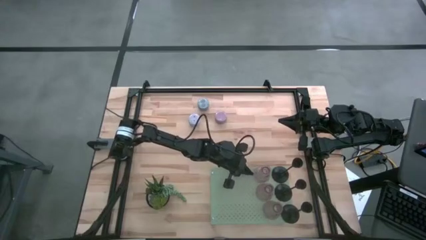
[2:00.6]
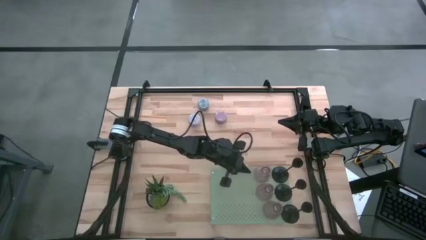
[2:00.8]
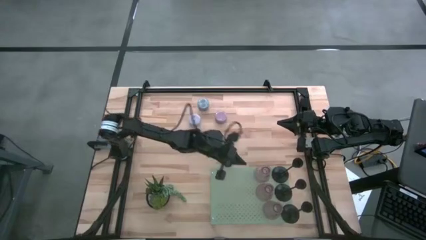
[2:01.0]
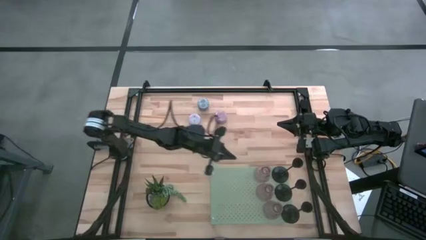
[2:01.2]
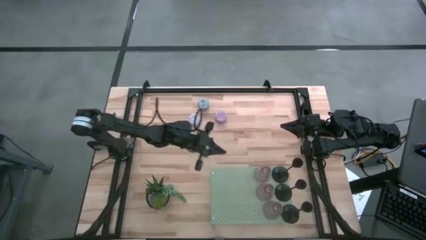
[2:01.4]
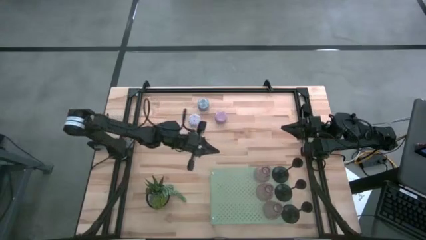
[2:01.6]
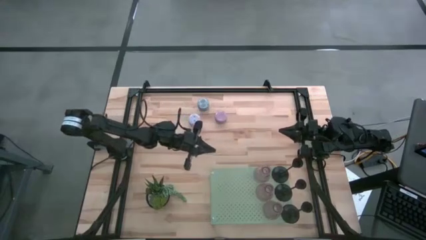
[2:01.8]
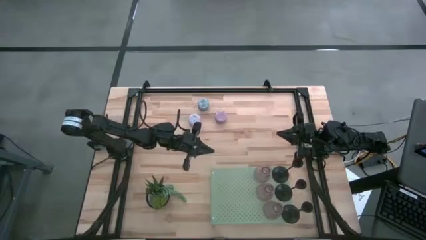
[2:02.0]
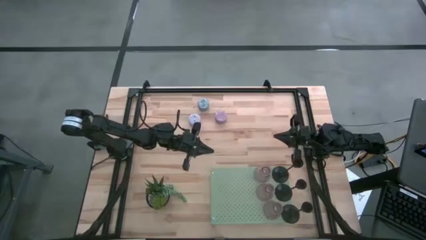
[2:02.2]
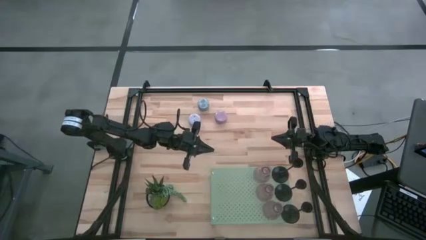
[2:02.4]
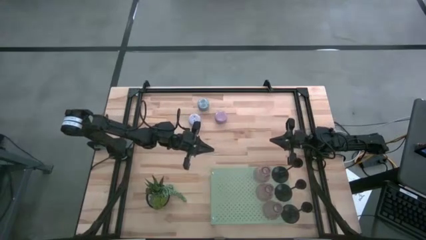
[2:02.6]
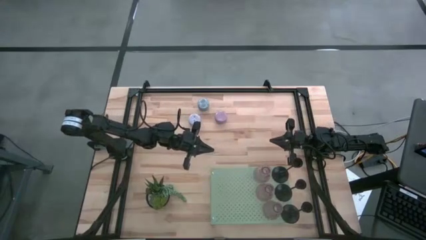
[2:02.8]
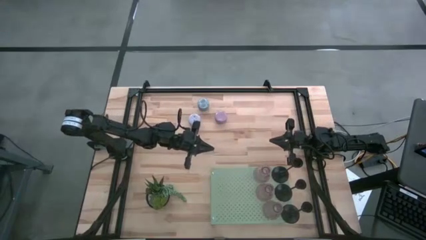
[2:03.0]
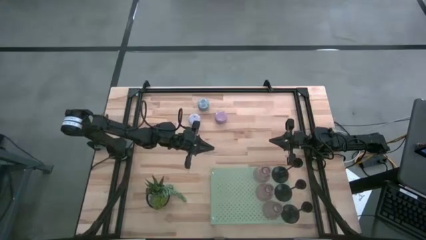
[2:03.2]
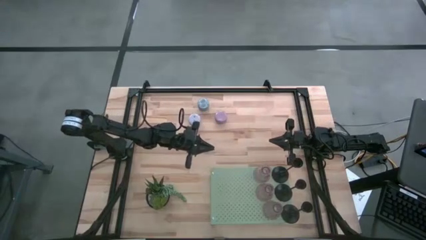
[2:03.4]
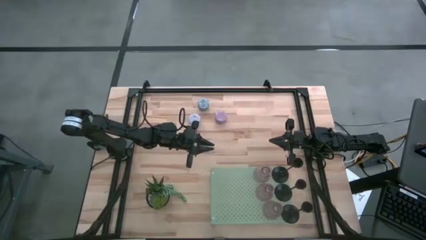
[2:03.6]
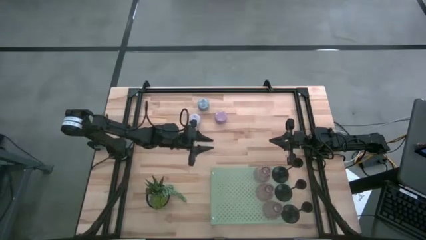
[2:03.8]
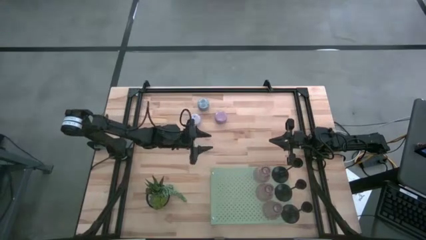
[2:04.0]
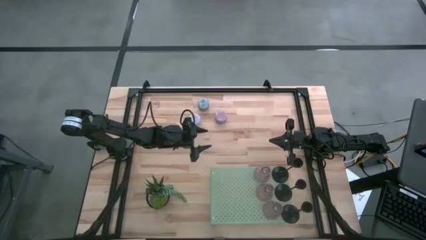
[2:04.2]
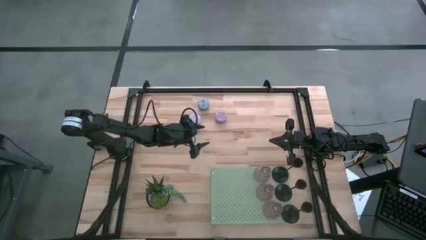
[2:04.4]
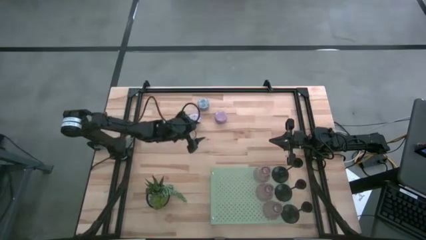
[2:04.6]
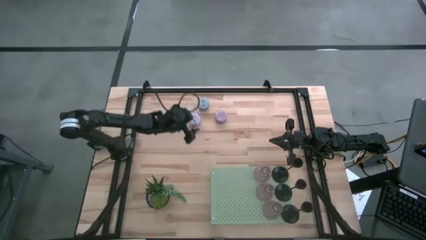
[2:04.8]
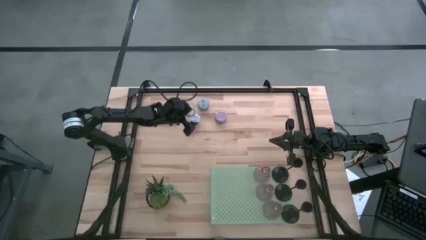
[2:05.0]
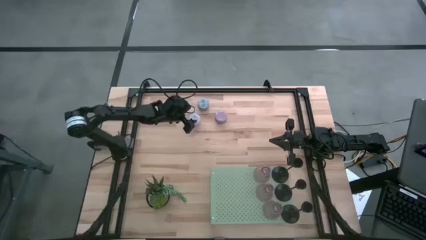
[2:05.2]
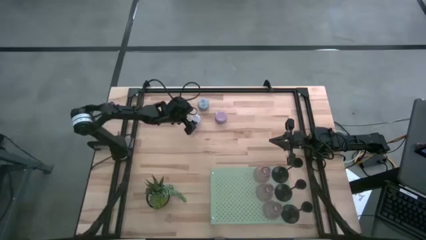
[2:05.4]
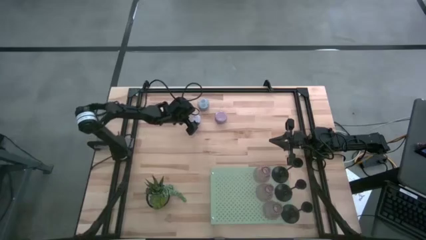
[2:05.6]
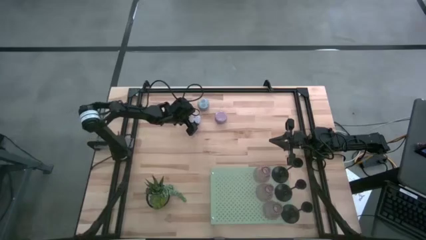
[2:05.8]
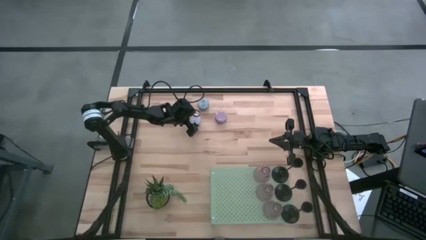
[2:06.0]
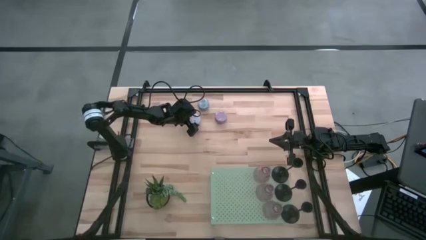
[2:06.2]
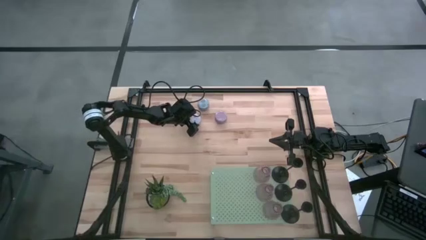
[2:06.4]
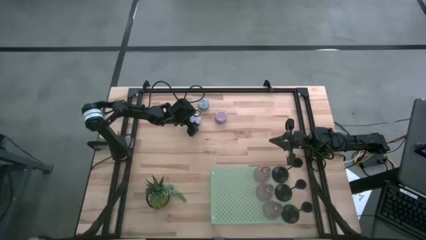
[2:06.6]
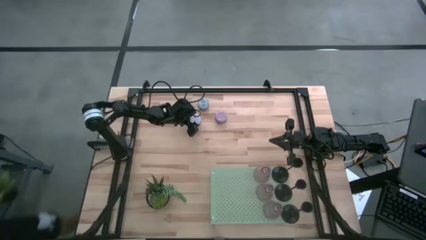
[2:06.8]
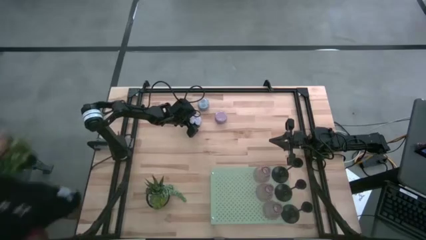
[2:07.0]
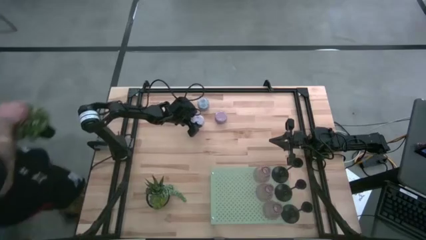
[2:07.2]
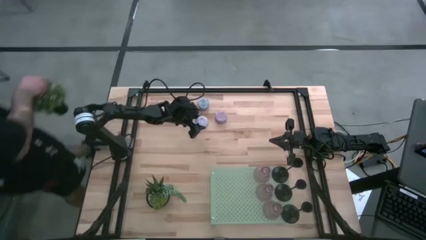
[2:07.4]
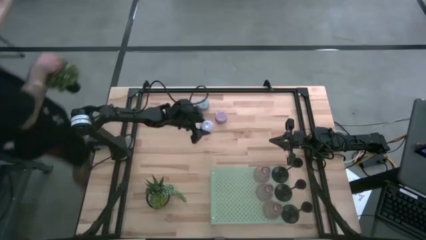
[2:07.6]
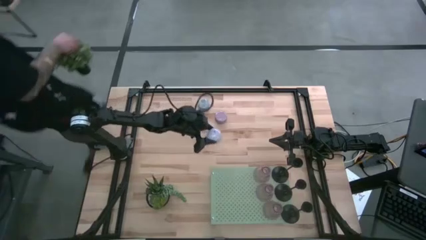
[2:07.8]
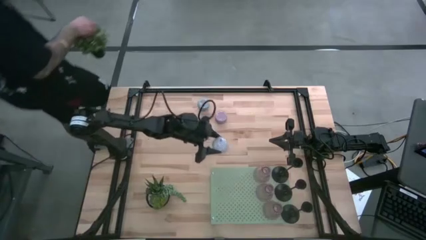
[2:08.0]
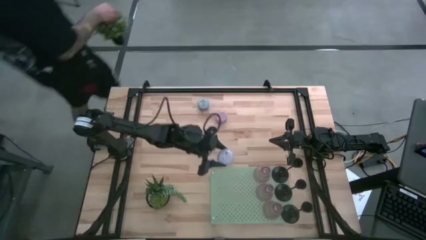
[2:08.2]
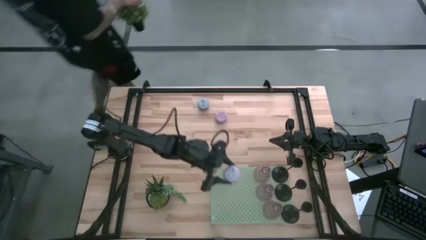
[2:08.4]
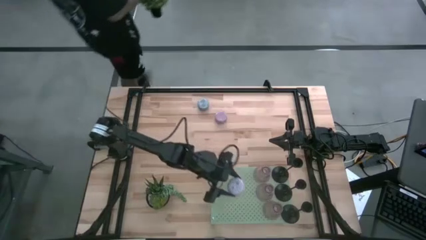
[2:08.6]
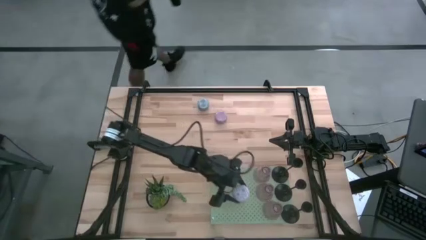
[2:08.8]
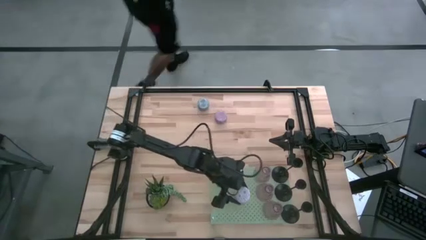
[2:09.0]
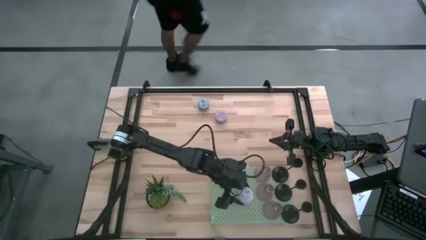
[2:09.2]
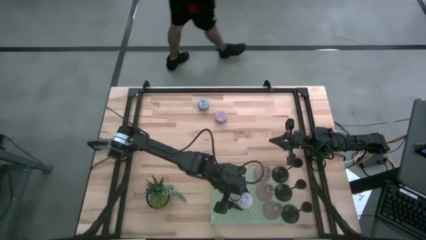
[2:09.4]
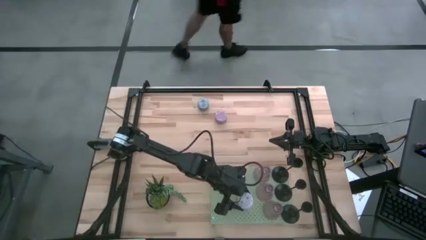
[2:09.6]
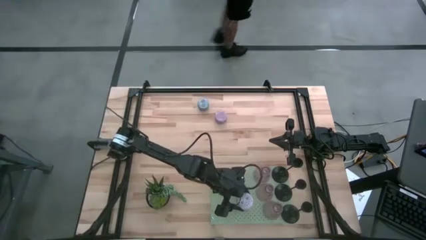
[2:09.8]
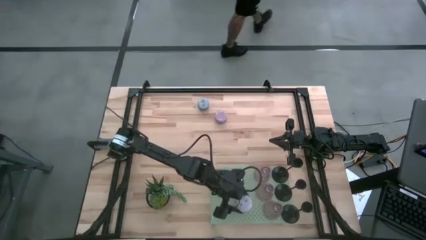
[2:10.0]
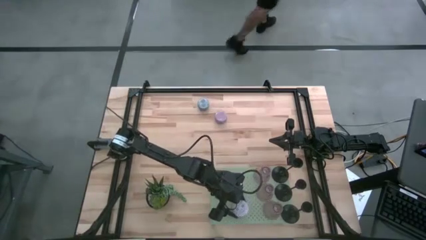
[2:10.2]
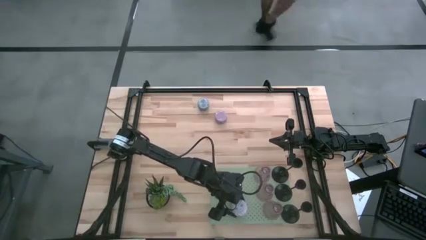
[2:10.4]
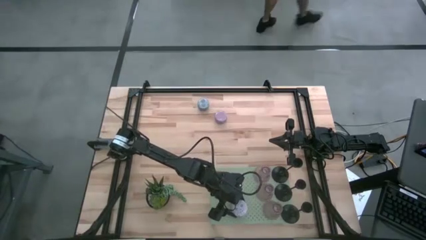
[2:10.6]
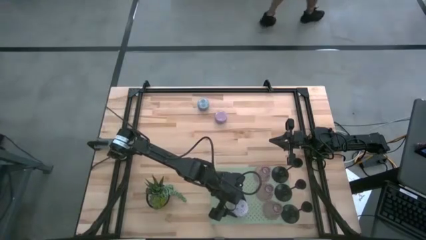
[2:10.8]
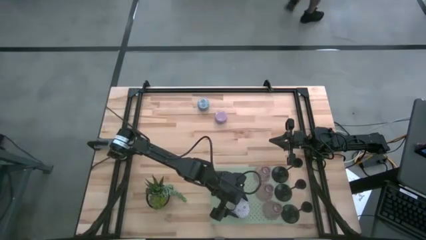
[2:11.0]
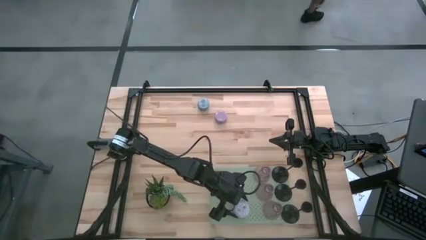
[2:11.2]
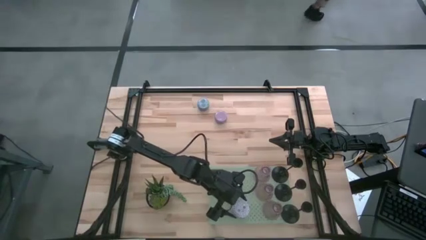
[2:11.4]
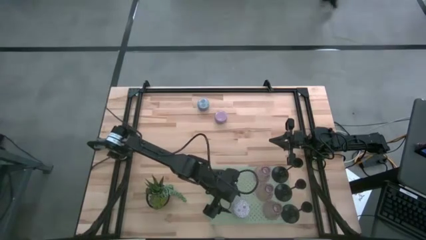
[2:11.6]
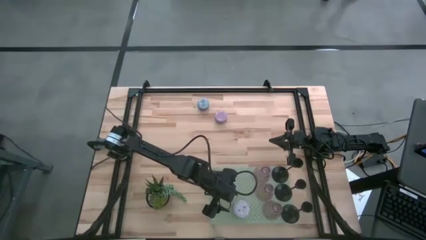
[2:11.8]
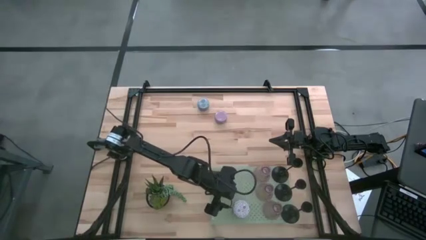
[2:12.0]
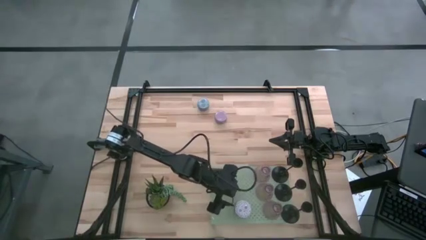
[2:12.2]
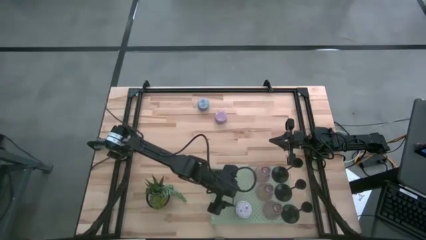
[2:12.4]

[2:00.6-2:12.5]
Task: Pick & Place candle stick holders
Put the red patterned scented candle on the shelf

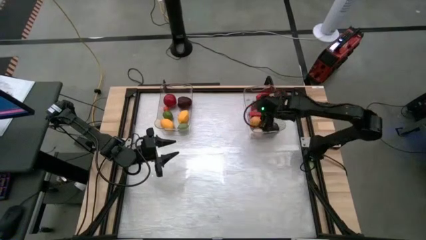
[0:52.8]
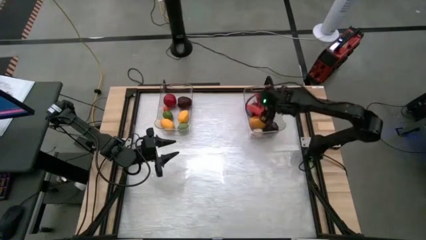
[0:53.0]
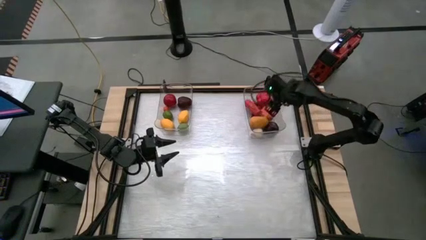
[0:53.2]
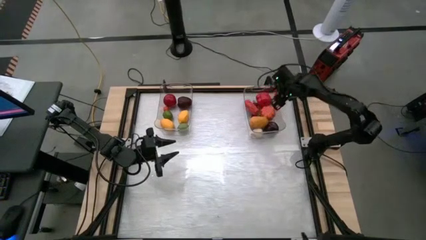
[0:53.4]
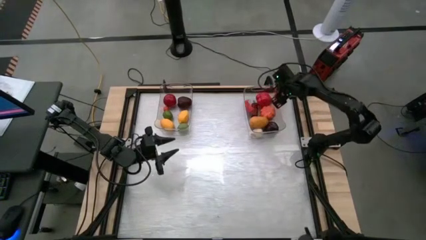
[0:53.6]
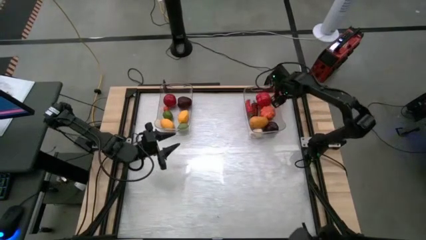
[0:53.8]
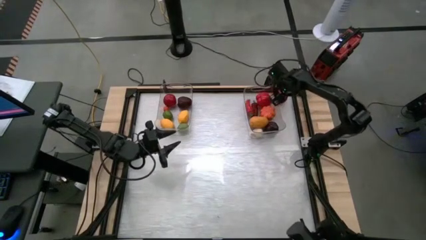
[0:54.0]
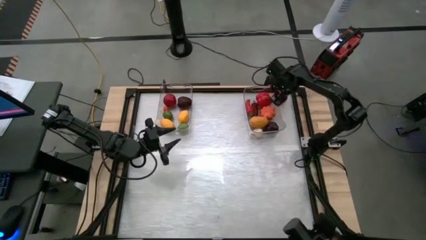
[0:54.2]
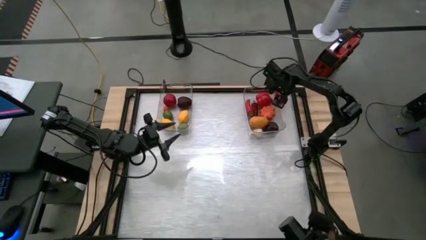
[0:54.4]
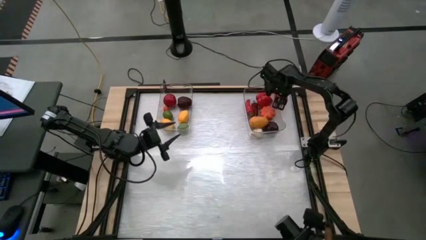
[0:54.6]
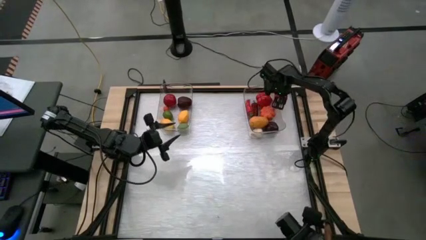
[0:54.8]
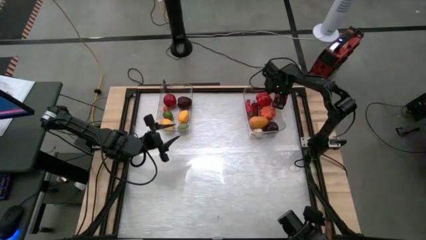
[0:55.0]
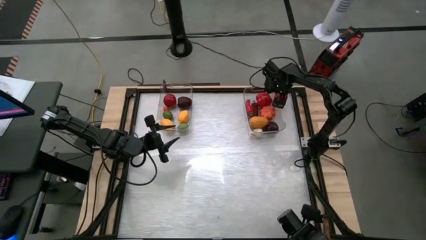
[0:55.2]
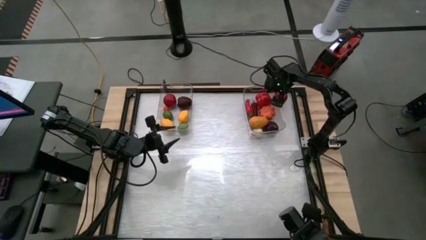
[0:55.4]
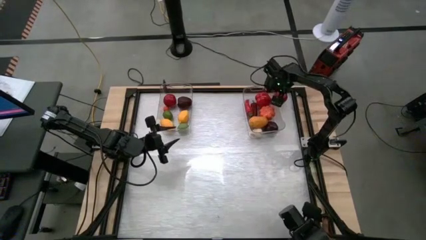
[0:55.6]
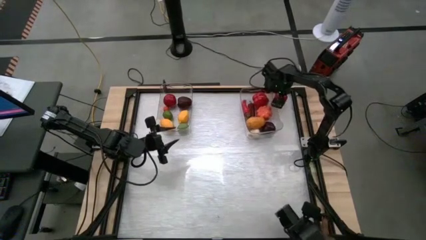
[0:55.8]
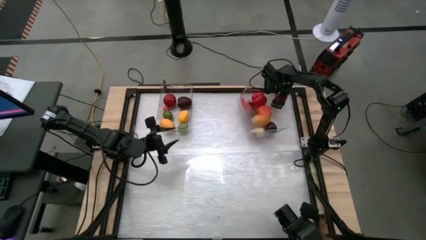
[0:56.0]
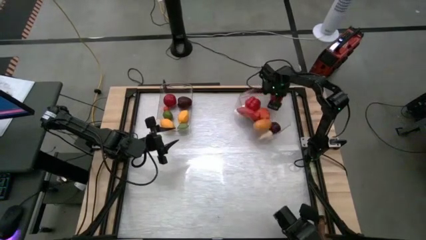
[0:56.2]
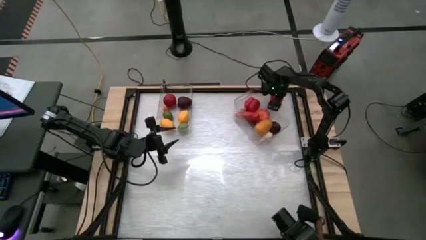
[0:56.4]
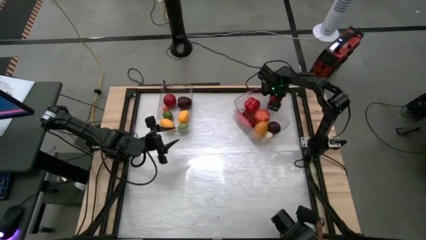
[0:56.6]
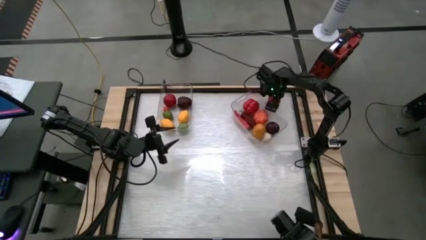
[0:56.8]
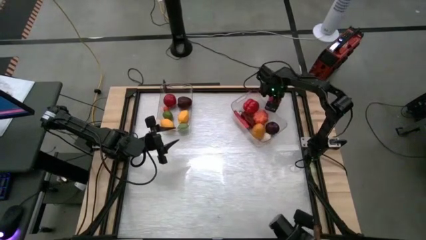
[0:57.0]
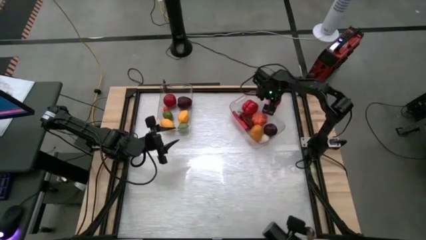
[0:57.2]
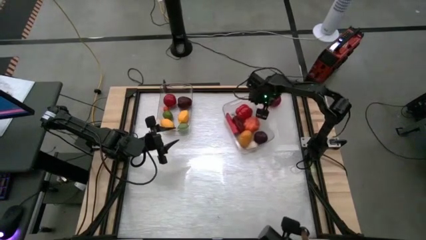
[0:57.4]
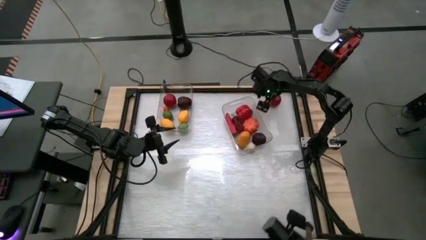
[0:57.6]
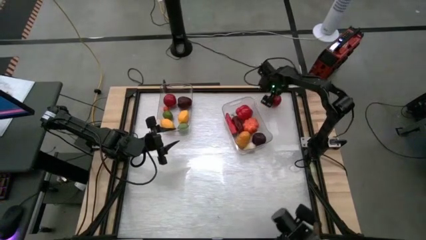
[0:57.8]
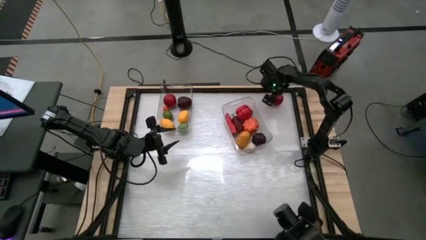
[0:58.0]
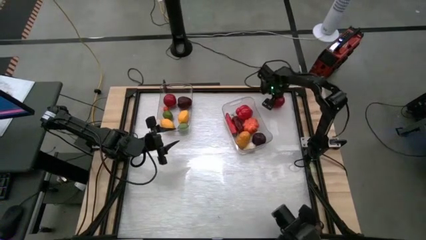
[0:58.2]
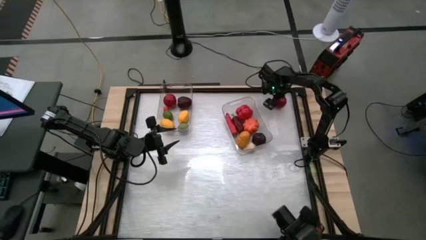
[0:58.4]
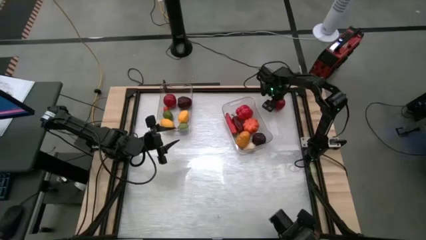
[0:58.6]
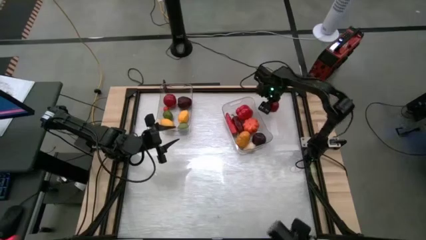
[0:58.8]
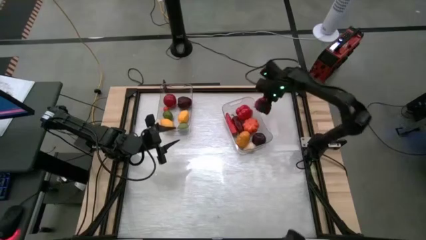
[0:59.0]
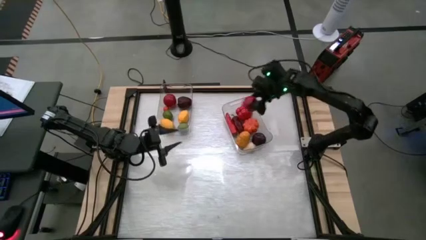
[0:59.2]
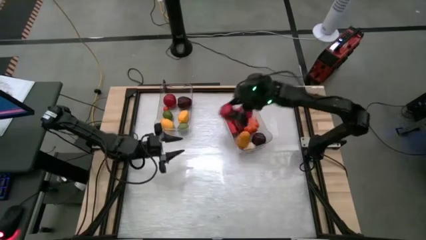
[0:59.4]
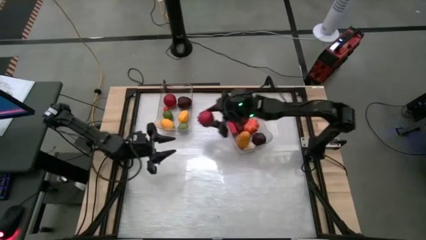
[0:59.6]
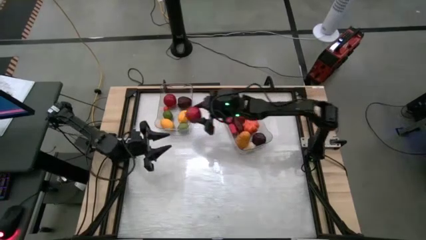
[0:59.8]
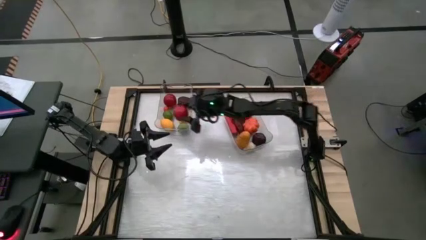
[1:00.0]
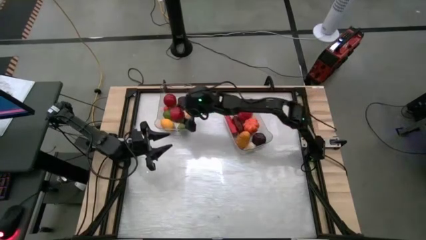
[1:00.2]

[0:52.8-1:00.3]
Task: Sort produce into baskets
Put the tomato into the left transparent bin
